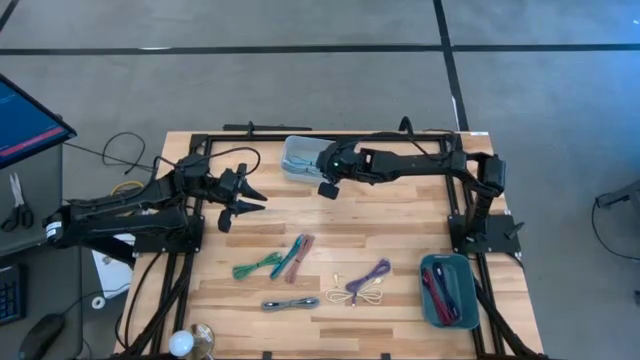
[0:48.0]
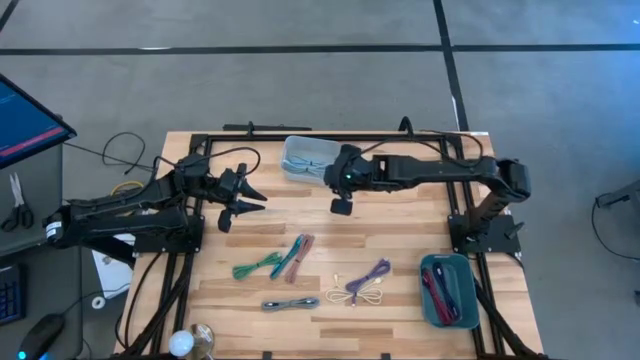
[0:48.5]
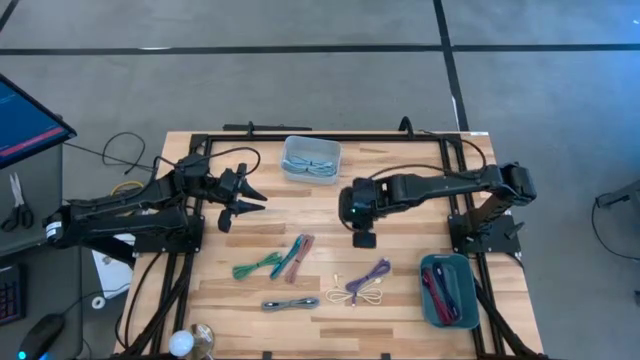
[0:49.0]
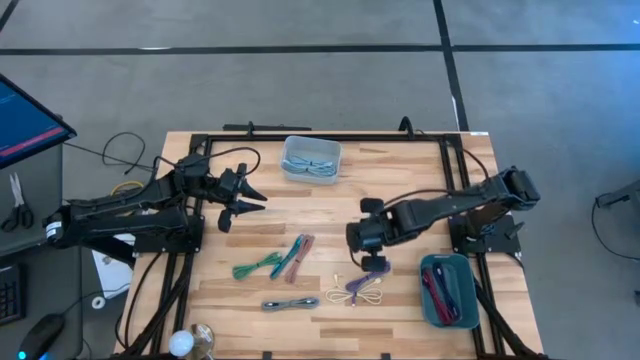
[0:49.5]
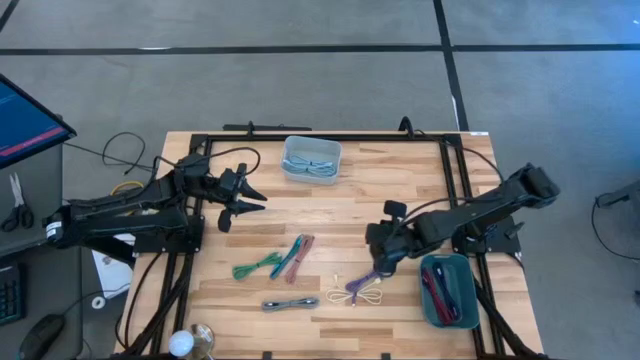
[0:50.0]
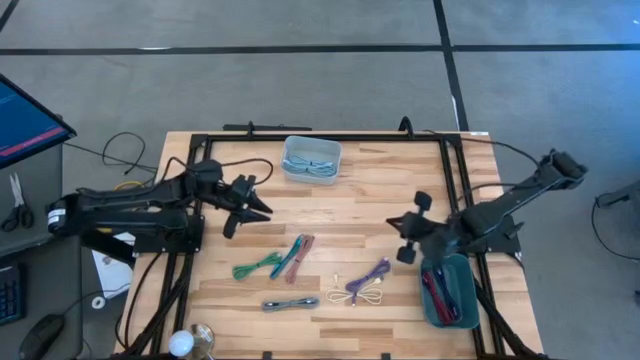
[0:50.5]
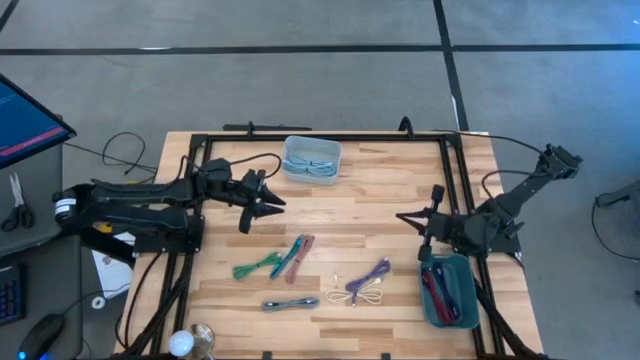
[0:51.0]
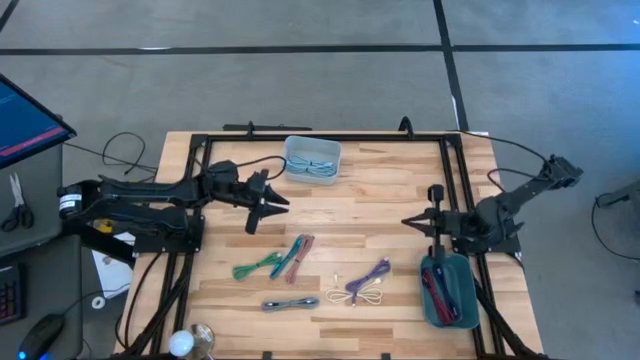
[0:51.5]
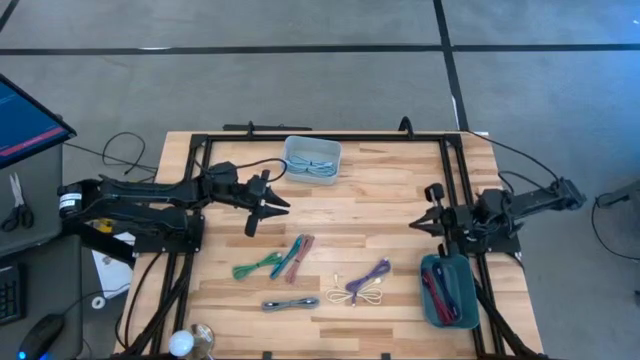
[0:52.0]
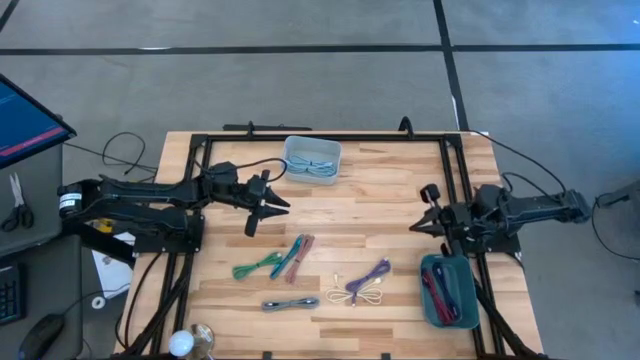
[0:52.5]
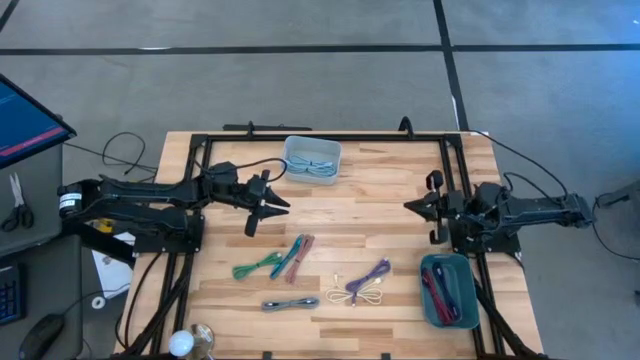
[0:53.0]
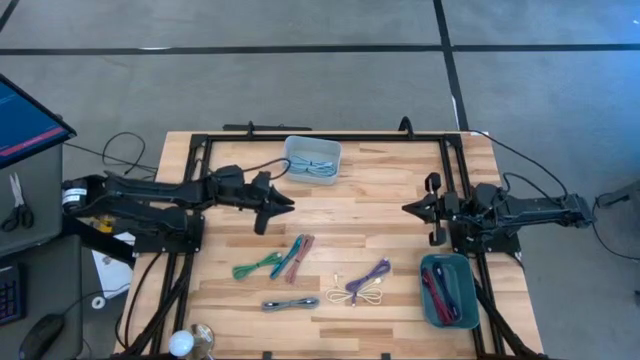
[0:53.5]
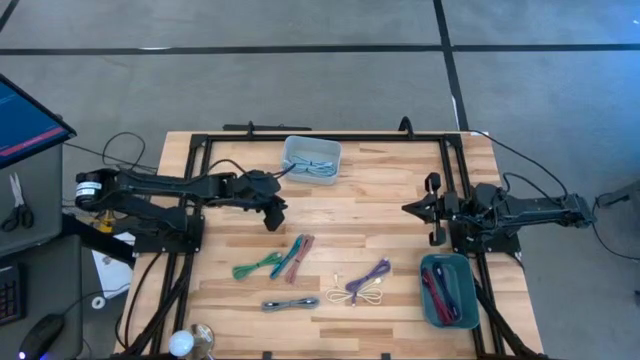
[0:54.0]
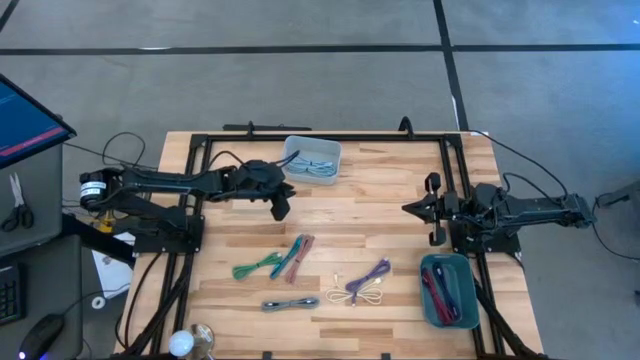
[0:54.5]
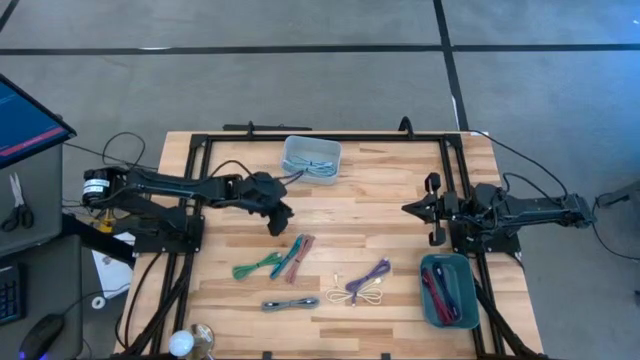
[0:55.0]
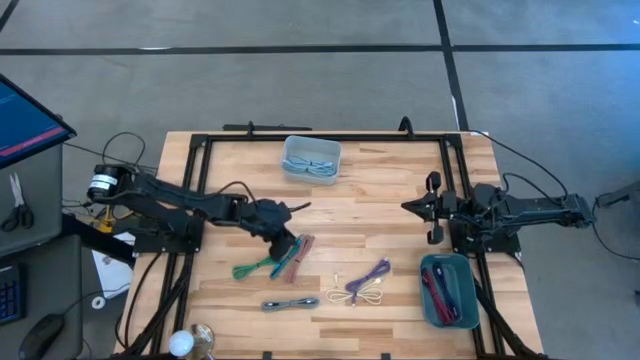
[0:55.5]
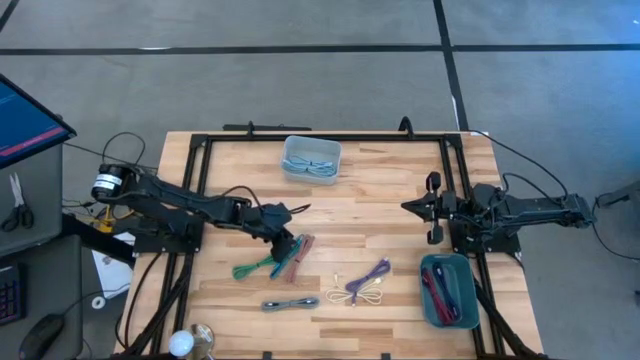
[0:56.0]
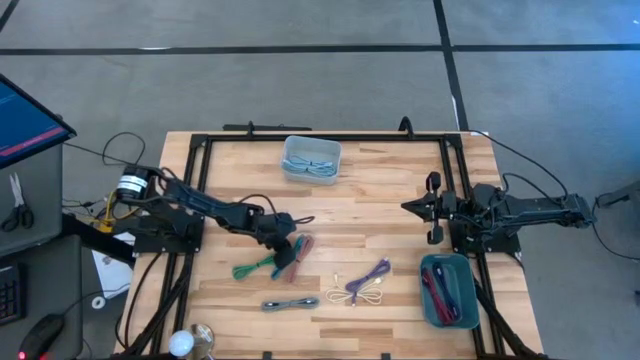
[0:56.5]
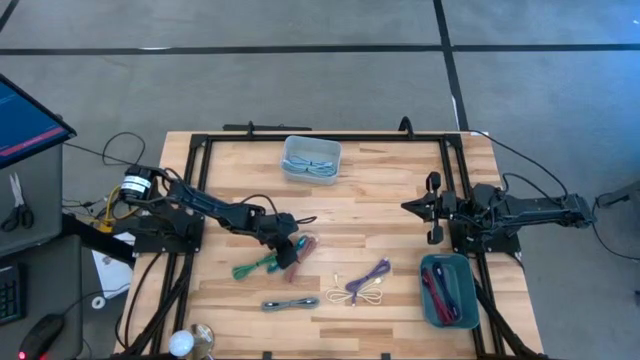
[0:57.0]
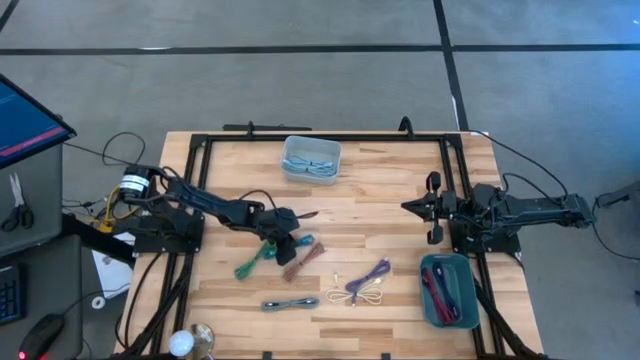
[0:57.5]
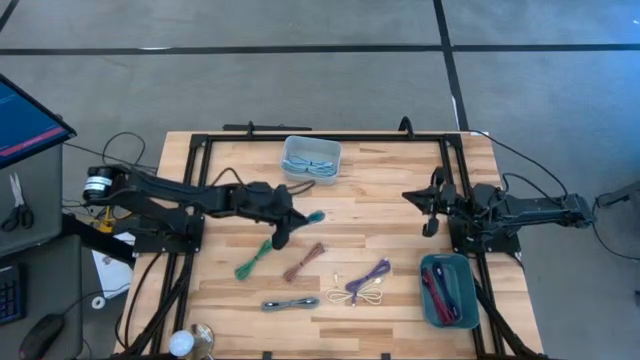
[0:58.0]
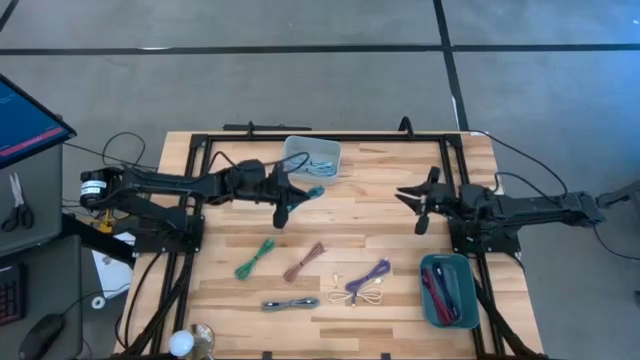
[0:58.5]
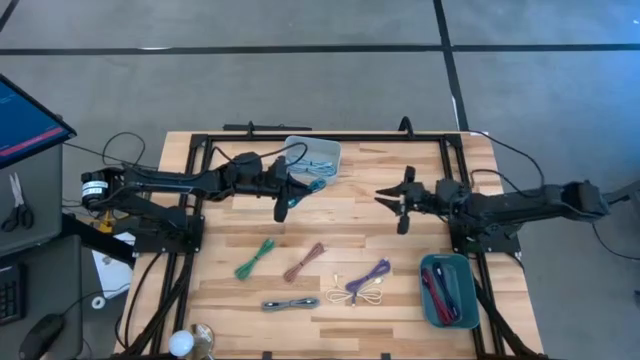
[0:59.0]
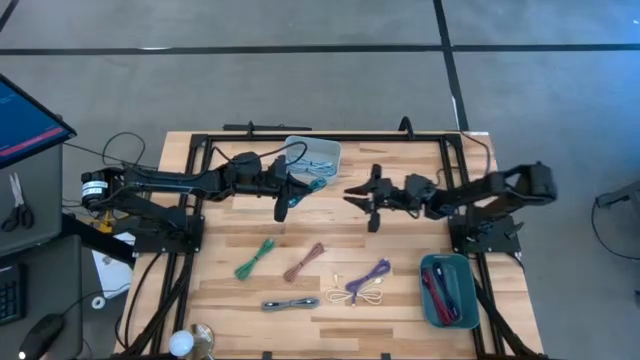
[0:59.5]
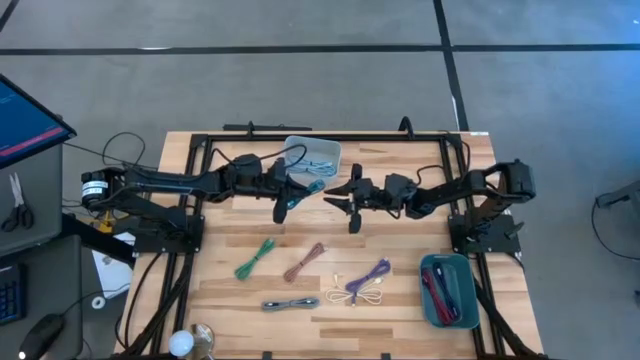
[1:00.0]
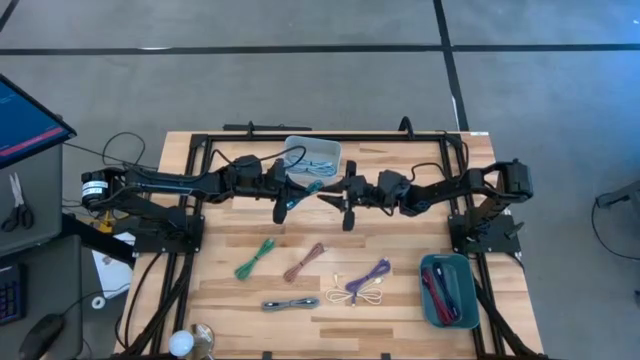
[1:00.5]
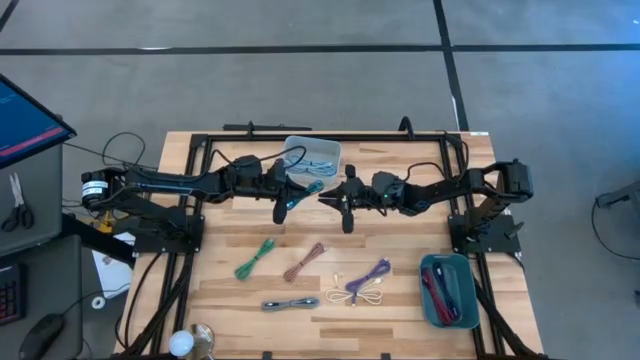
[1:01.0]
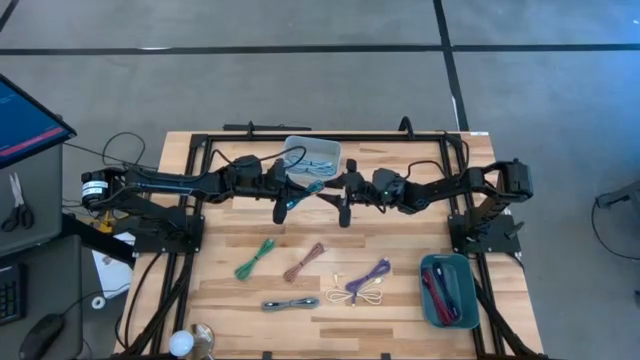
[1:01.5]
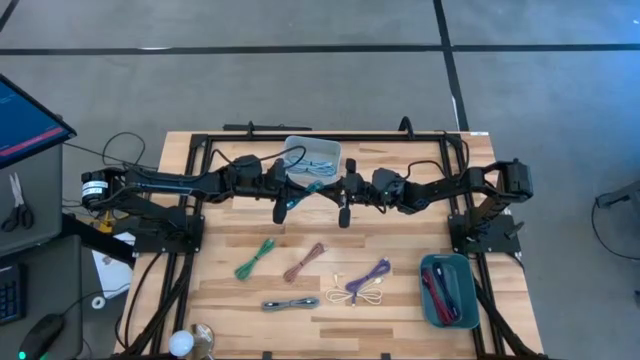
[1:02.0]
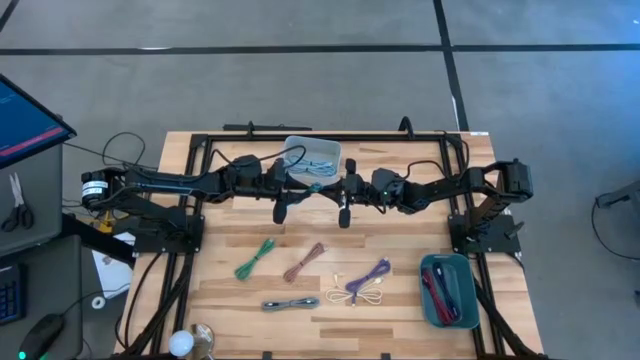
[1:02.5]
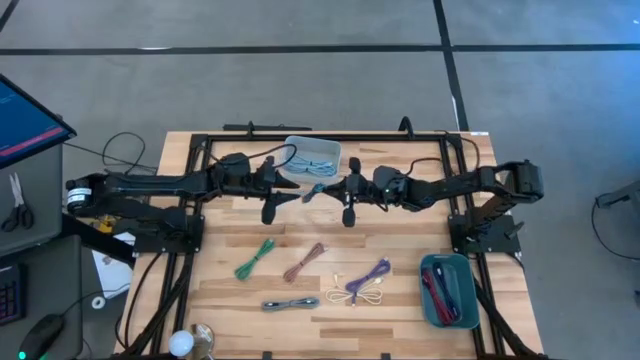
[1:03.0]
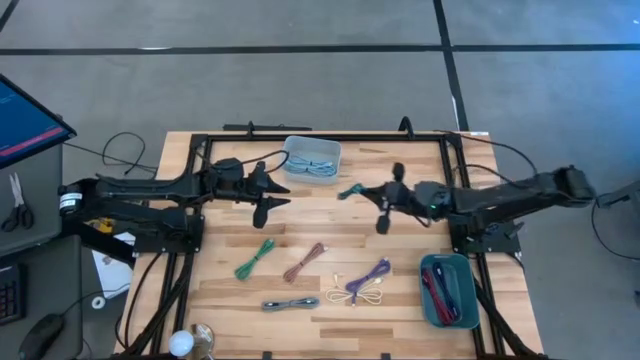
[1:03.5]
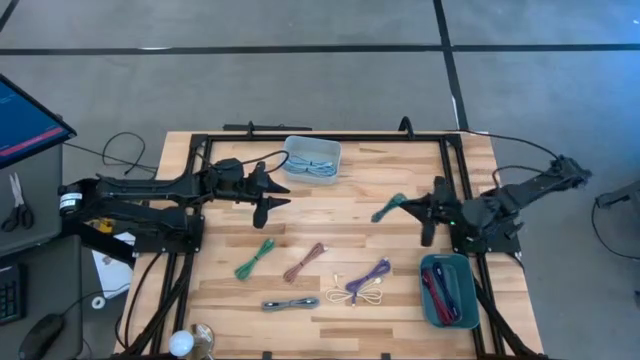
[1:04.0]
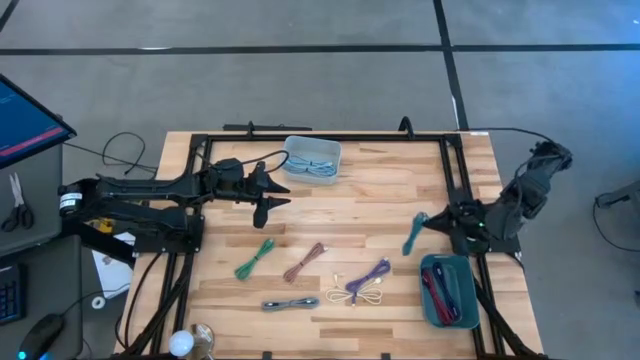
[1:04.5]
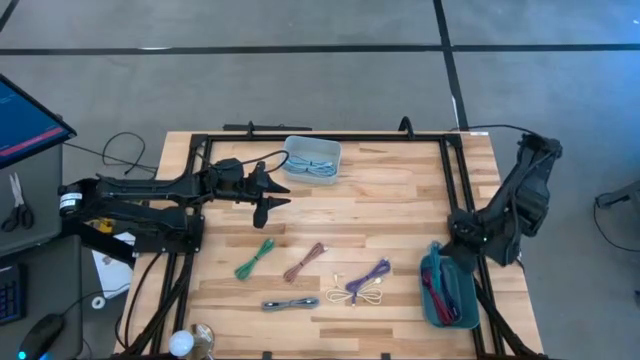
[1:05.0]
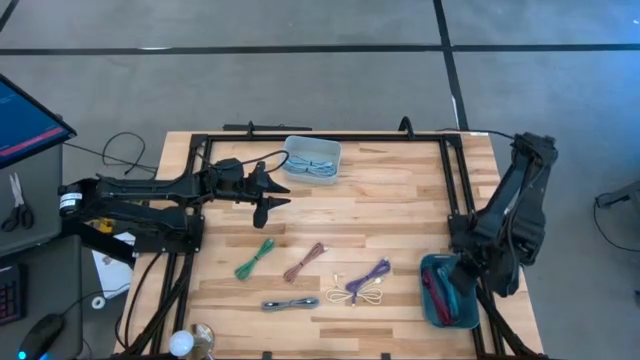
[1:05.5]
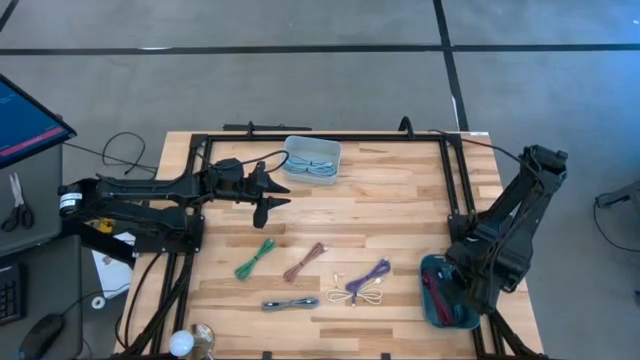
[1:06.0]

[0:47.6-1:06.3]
Task: Pick & Place USB Port
Put the blue patterned charger cable into the blue bin

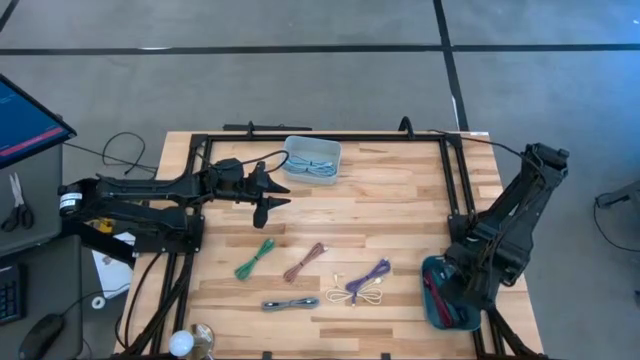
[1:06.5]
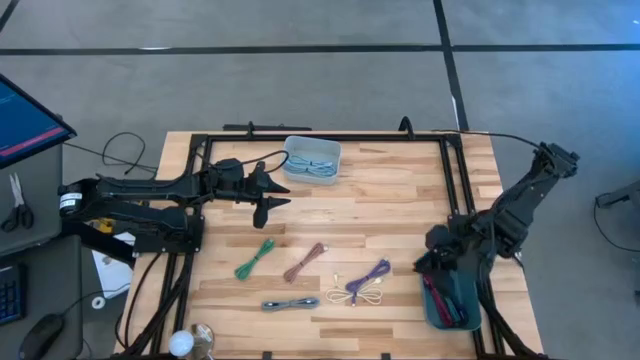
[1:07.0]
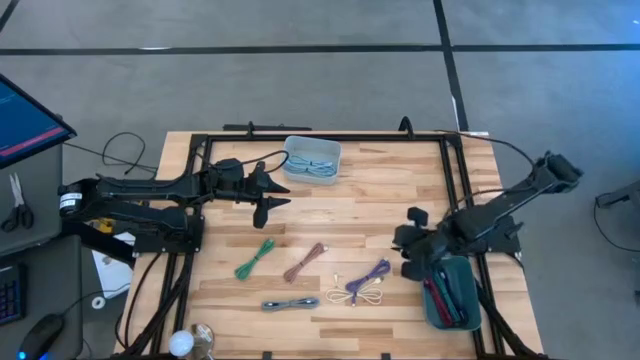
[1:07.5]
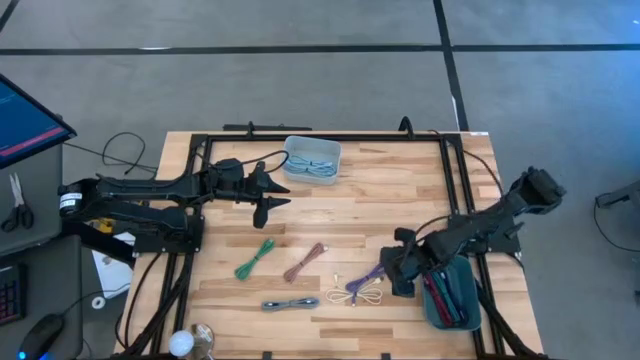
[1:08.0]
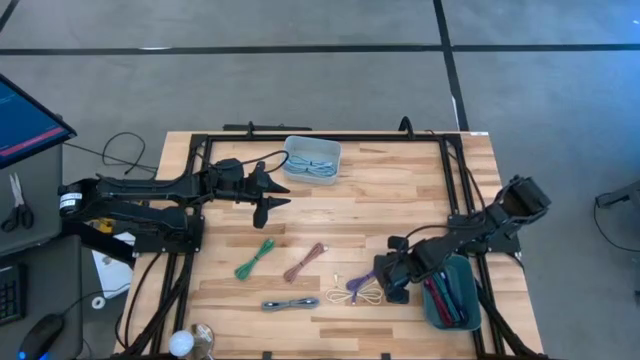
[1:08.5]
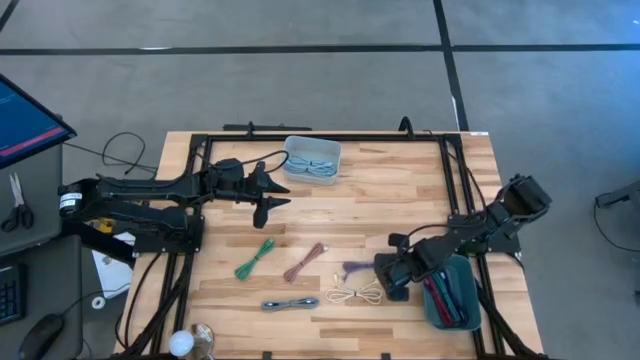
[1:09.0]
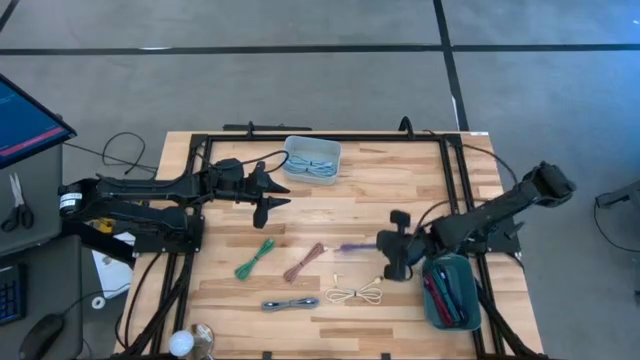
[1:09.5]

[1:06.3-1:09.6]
Put the violet charger cable into the gray bin
